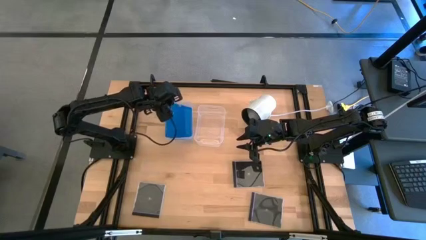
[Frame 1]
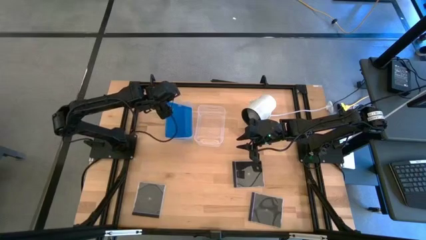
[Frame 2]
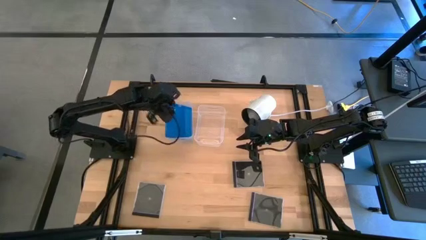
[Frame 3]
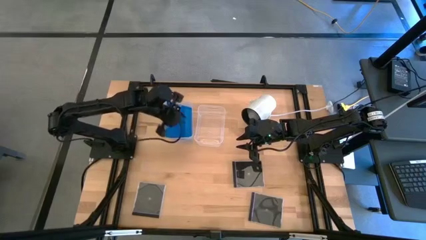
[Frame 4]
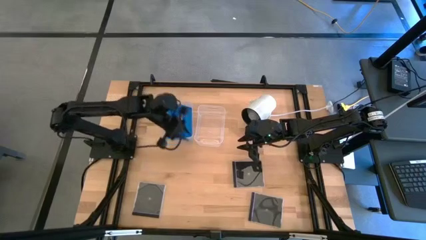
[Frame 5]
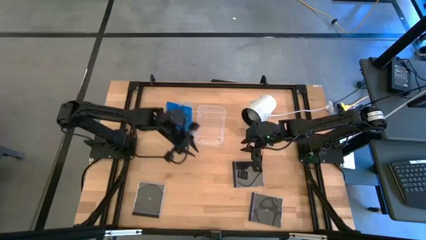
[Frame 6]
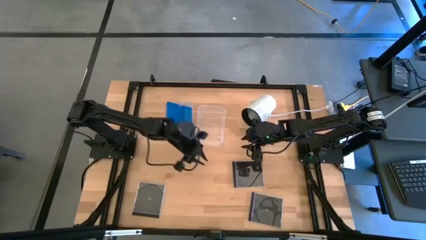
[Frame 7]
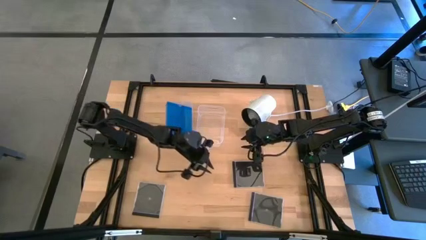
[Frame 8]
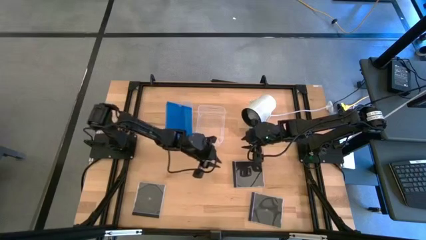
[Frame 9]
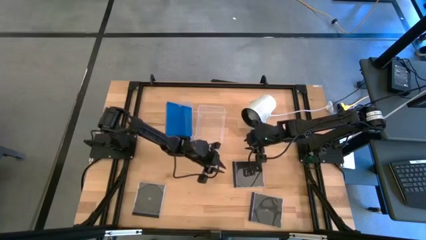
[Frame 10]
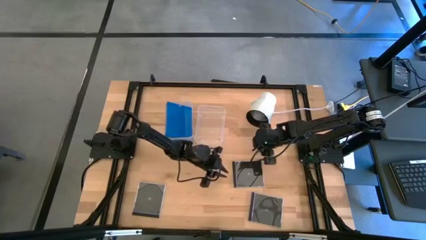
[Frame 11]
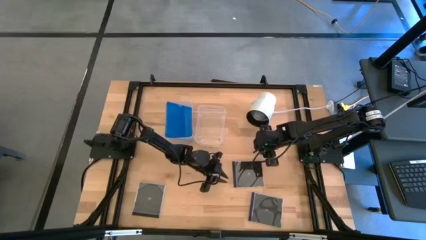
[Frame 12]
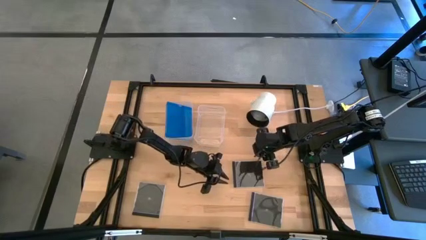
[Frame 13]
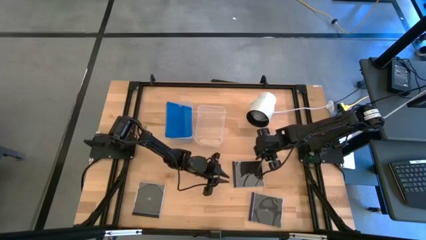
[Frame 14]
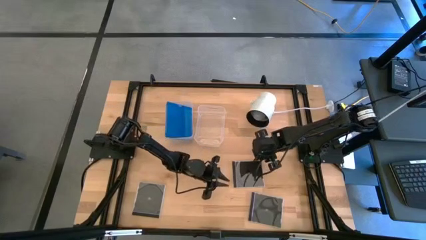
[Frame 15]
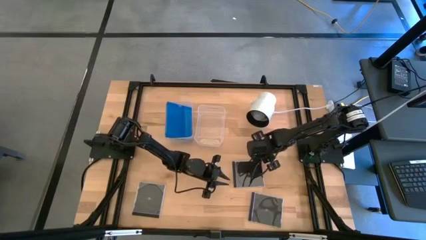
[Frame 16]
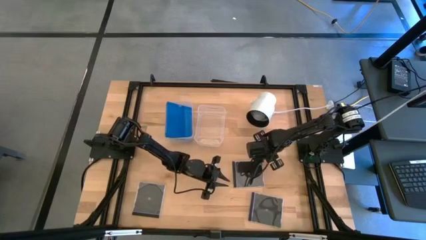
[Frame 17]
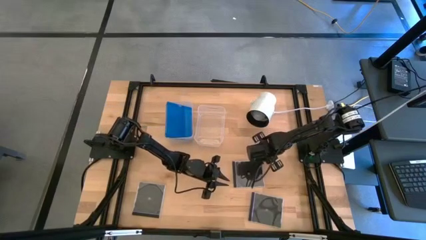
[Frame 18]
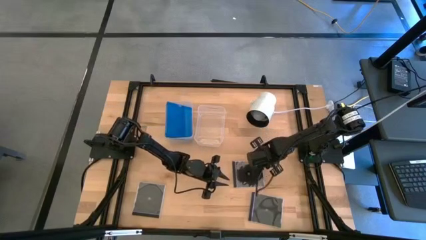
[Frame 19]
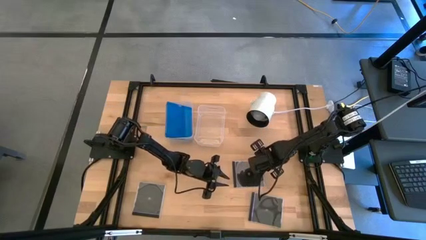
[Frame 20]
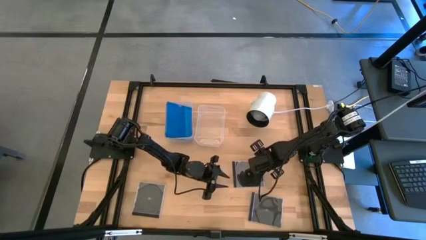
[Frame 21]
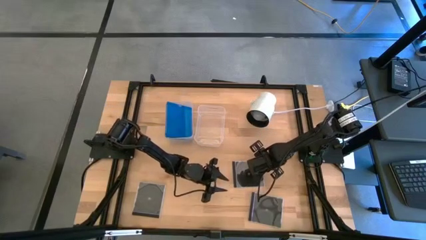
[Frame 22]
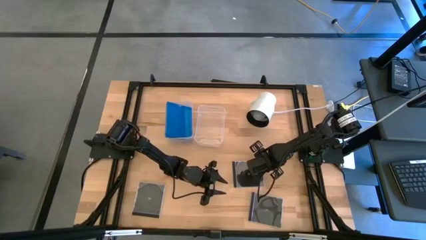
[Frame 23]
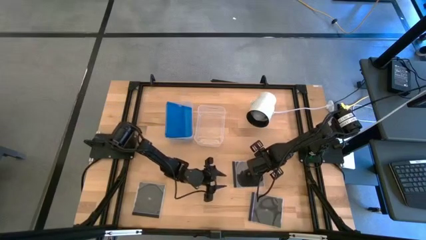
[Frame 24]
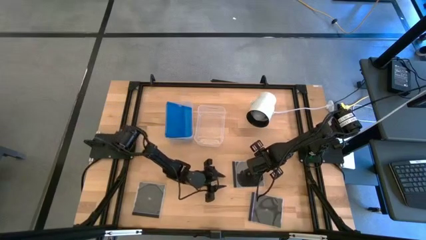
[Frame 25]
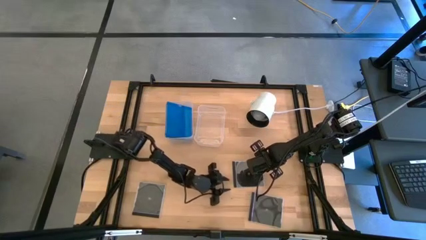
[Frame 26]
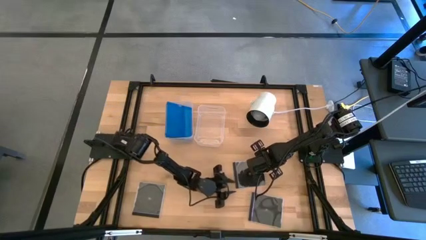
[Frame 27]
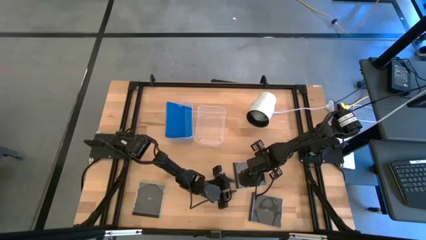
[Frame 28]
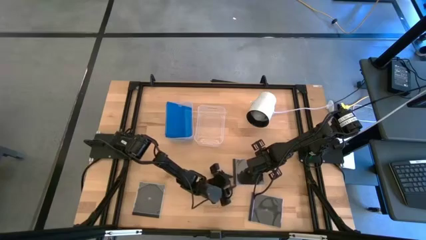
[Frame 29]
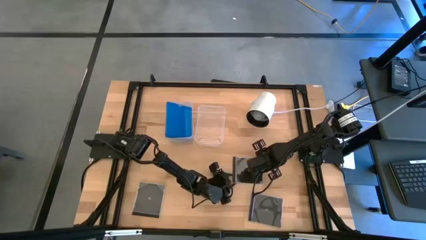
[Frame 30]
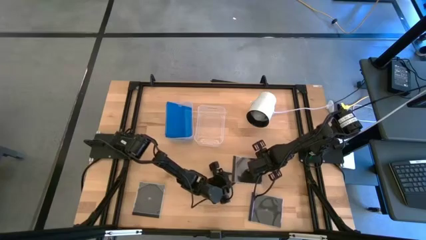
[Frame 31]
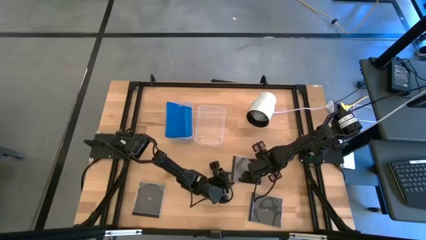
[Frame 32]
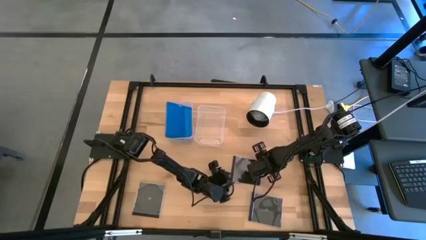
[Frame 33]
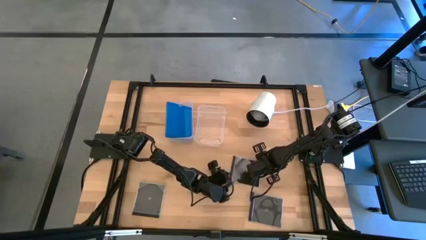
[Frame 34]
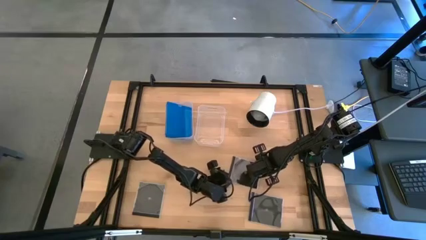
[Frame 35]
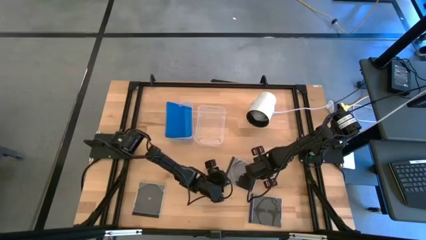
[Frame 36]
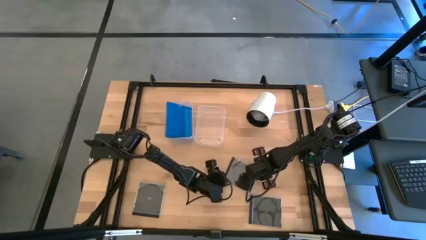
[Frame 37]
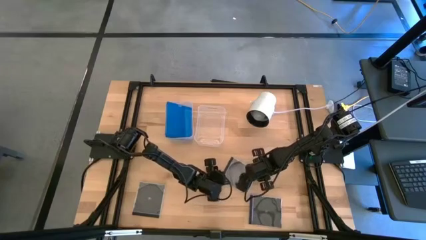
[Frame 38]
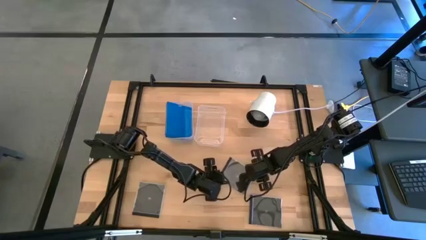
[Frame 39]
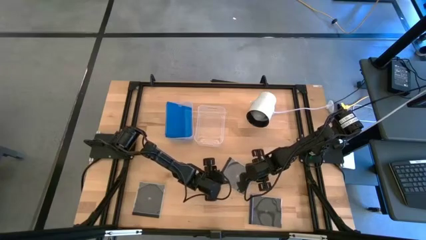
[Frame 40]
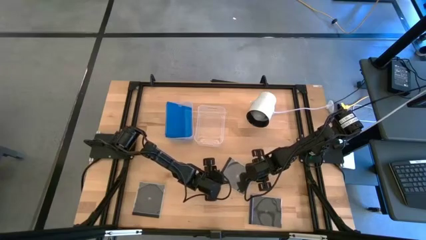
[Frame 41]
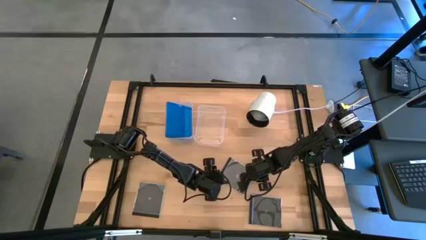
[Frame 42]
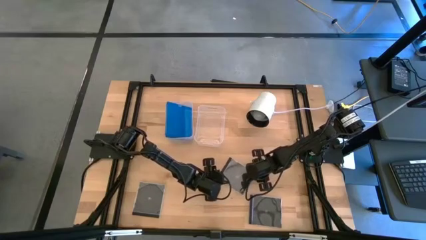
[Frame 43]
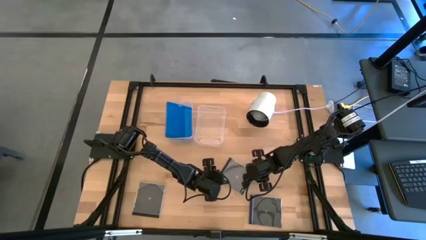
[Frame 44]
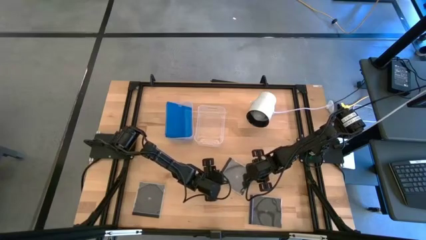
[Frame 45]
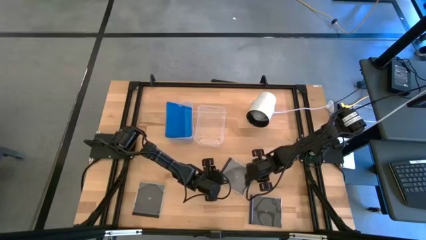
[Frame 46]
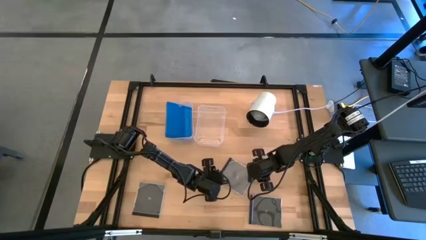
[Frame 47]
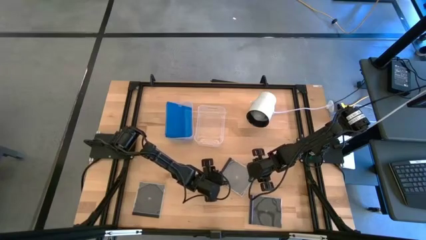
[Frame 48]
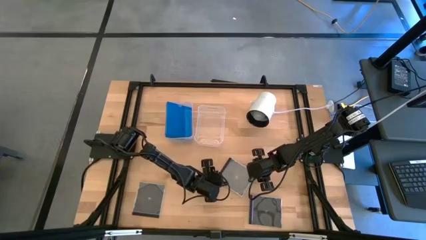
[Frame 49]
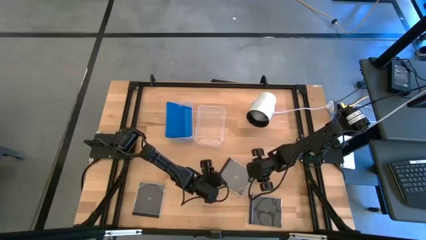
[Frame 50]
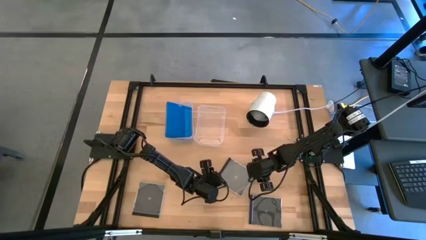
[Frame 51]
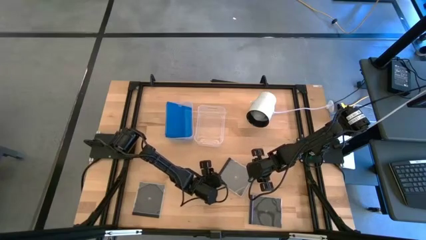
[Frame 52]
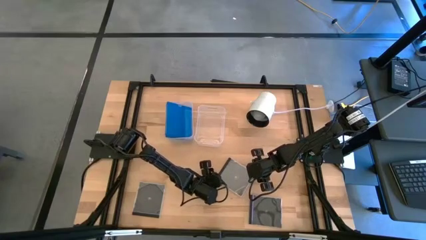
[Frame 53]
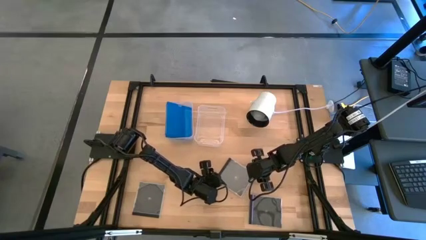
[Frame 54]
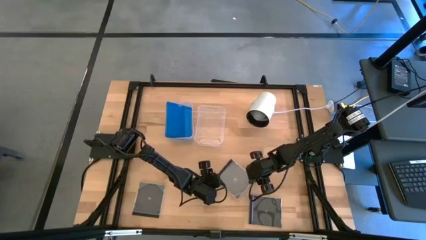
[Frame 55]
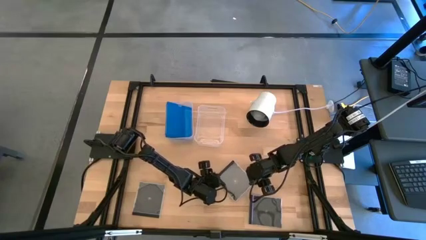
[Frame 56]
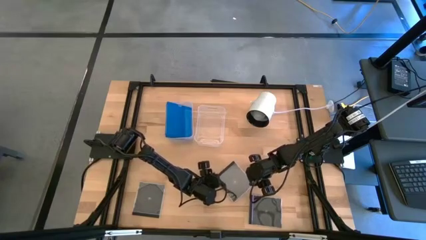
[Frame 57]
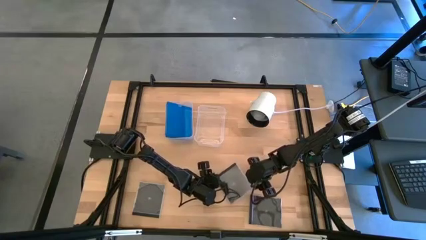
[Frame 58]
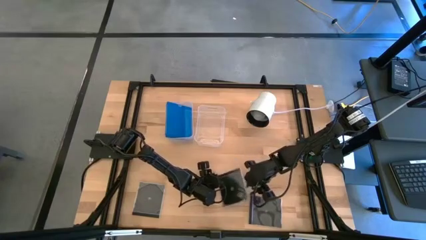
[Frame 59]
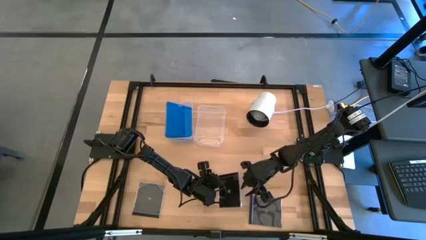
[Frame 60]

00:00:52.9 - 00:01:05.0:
Task: Pick & place jewel cases by type
Put the top black cd case into the right transparent bin

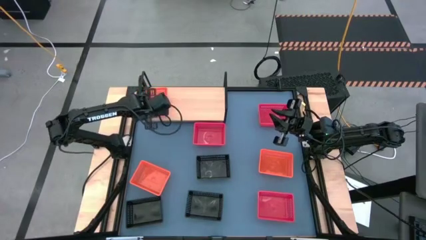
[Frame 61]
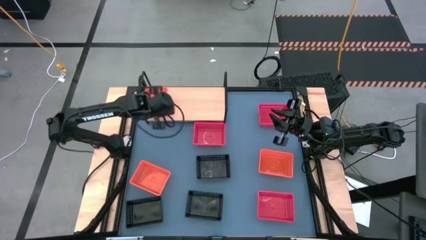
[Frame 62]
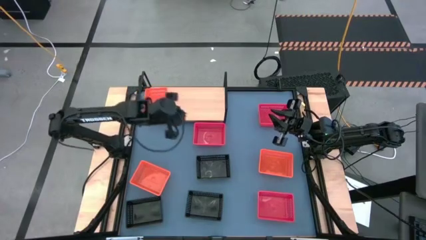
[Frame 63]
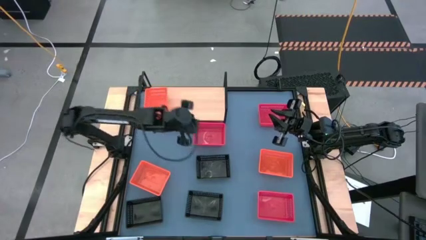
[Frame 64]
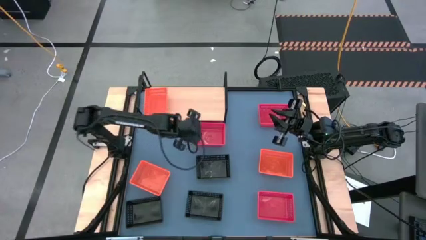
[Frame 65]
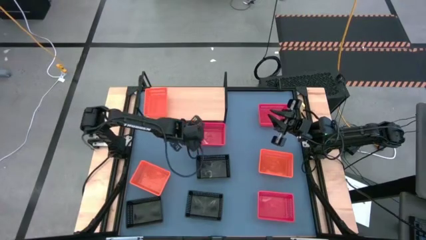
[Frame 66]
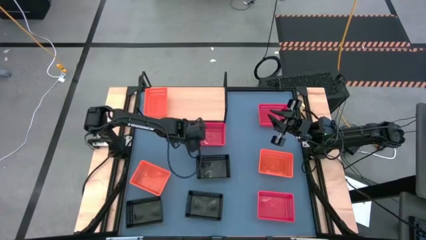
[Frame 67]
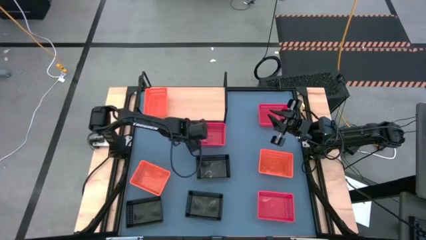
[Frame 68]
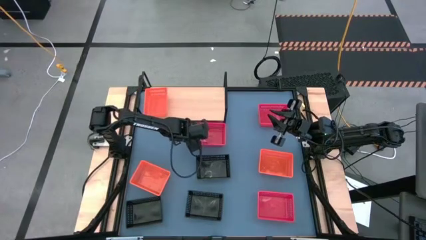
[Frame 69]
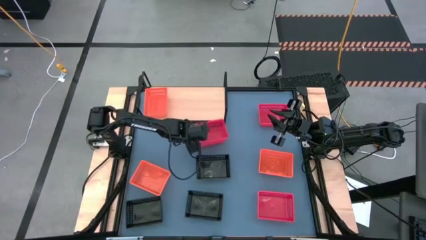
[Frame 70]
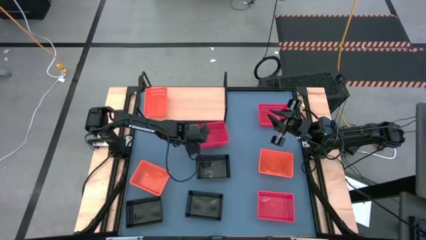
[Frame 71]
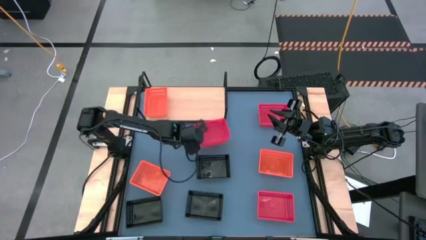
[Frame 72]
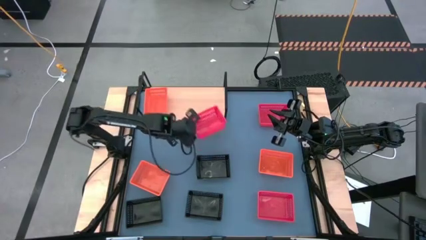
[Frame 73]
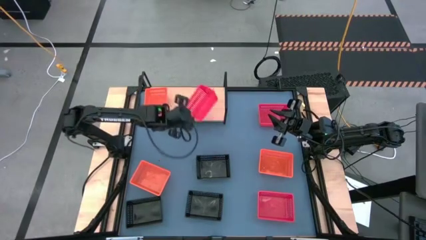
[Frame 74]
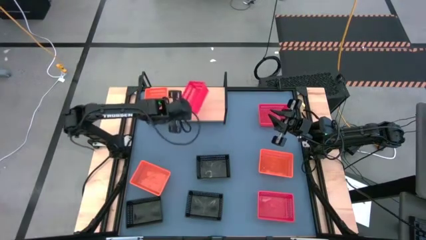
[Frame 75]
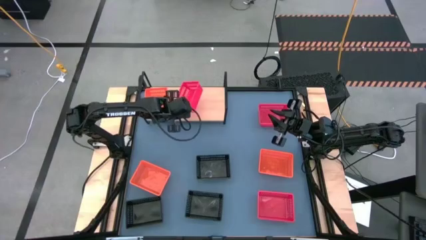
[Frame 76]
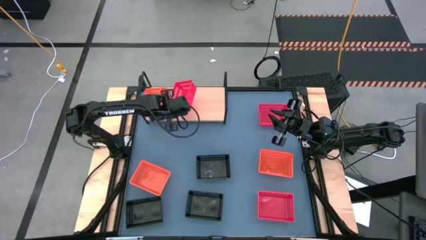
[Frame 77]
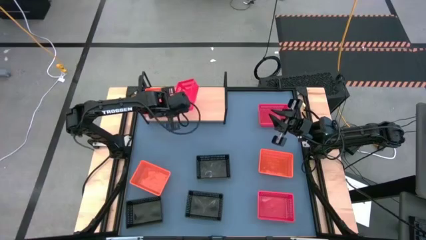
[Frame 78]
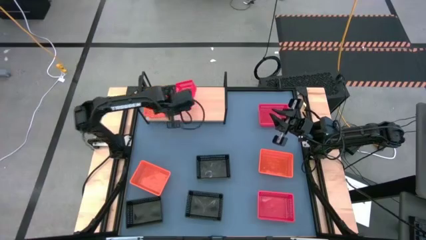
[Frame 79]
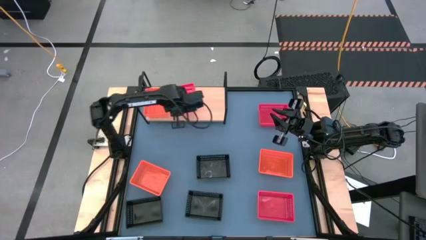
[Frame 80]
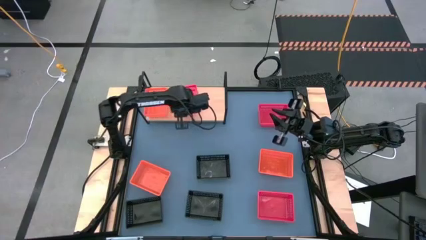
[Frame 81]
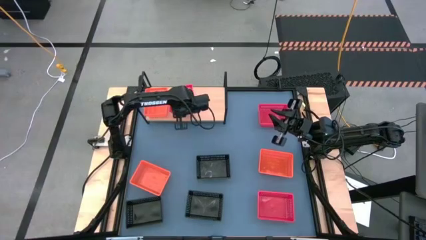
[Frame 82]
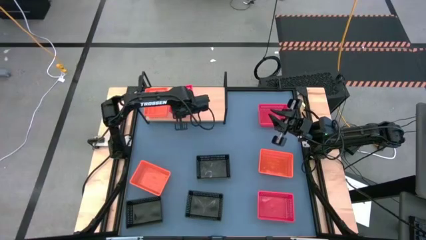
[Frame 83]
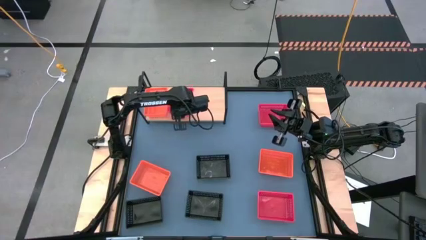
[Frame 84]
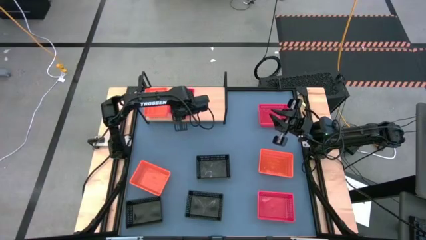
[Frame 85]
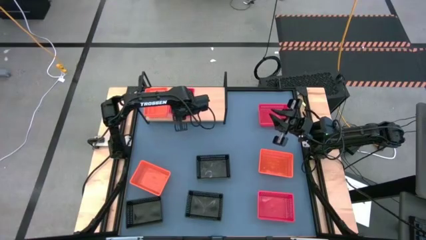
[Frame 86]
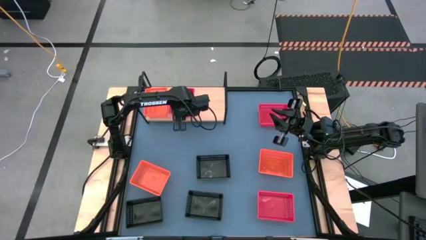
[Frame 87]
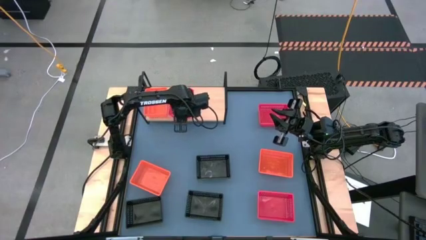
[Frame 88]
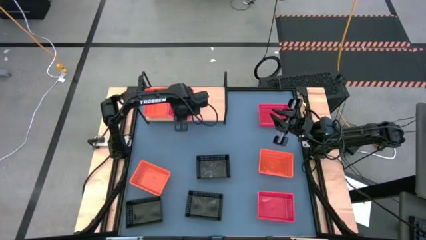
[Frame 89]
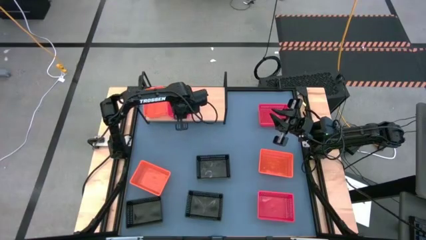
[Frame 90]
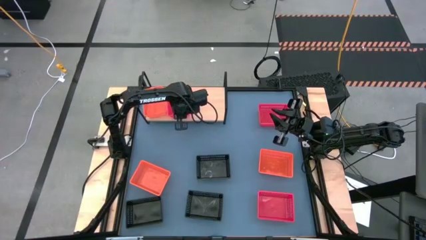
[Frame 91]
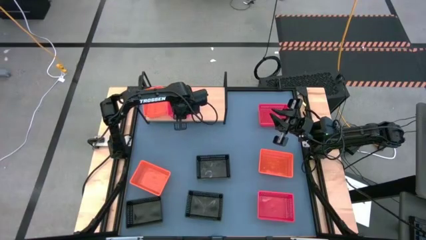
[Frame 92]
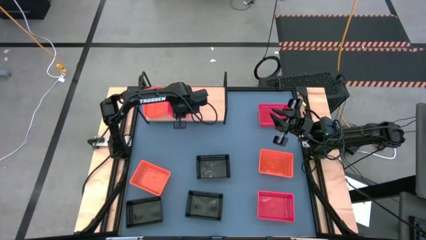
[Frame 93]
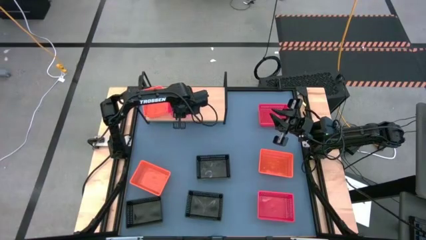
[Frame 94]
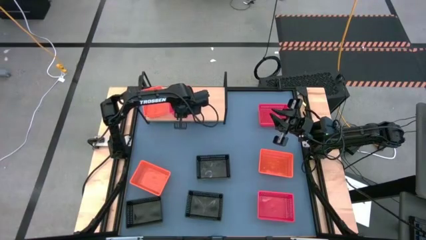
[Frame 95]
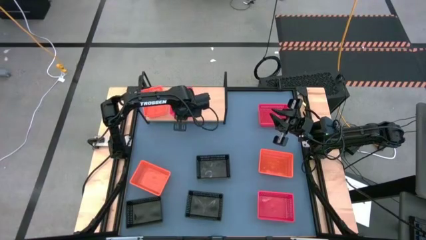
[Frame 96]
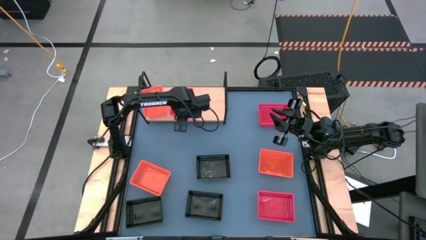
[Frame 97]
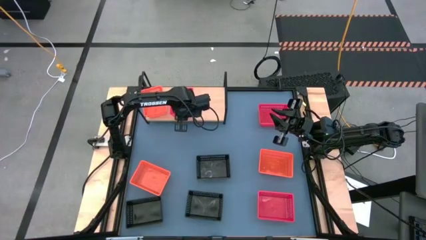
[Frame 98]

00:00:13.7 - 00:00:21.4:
Task: Stack baskets on shelf by color
Put the left red bin on the shelf
